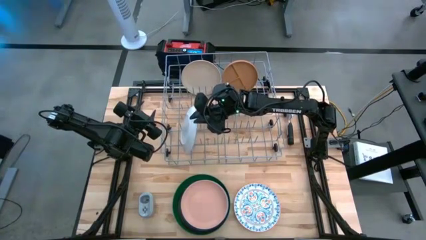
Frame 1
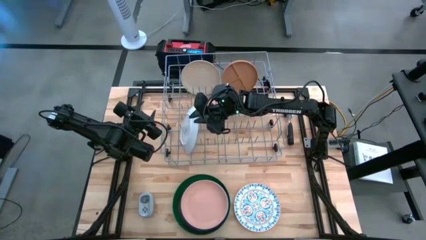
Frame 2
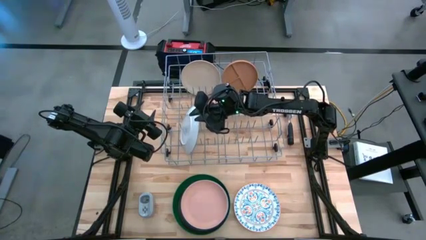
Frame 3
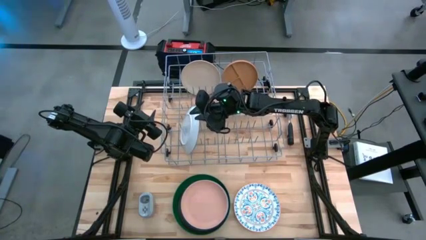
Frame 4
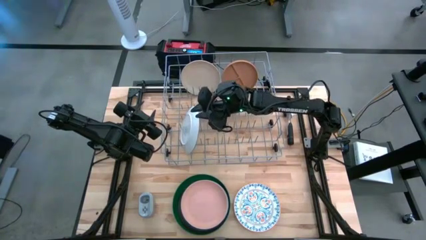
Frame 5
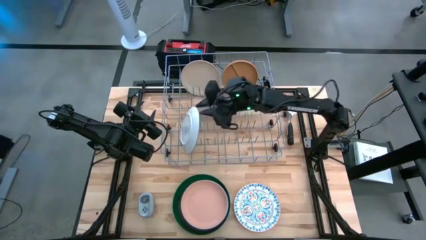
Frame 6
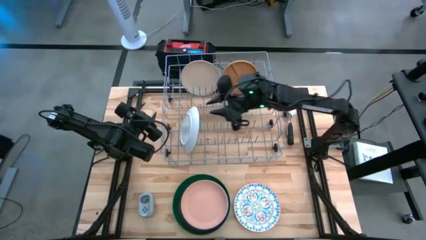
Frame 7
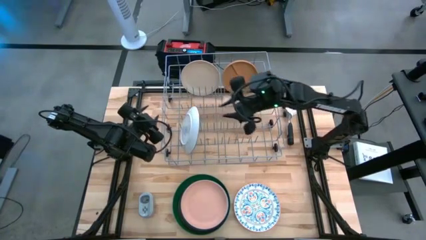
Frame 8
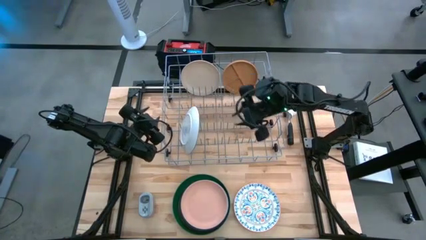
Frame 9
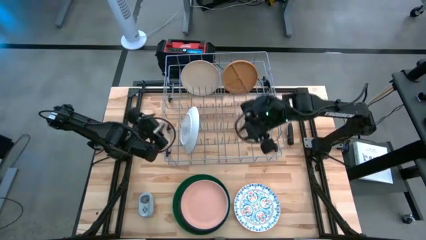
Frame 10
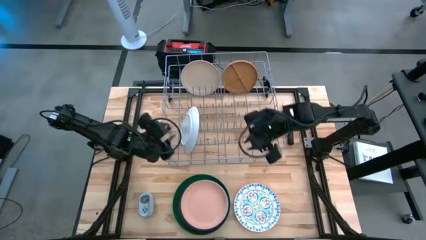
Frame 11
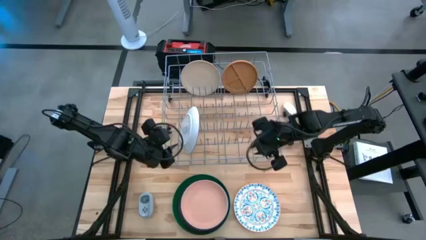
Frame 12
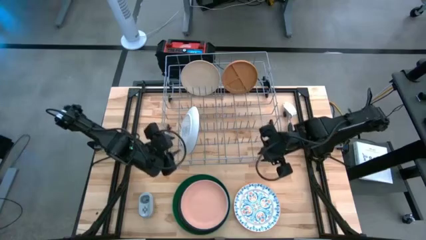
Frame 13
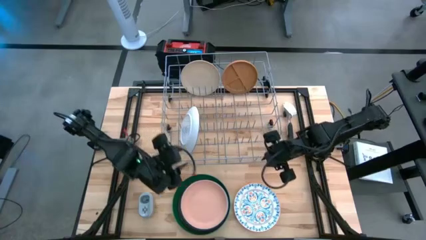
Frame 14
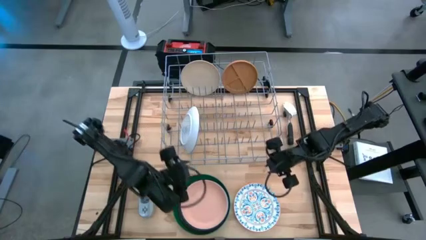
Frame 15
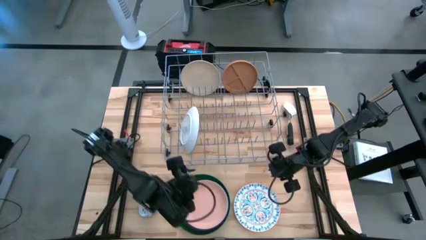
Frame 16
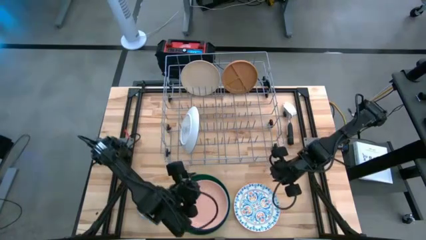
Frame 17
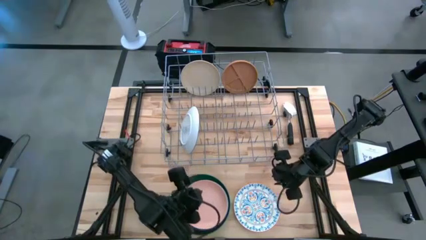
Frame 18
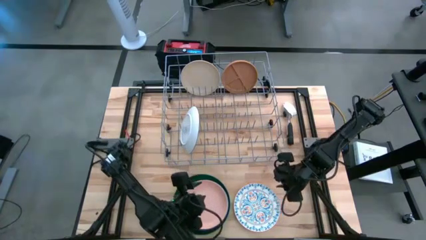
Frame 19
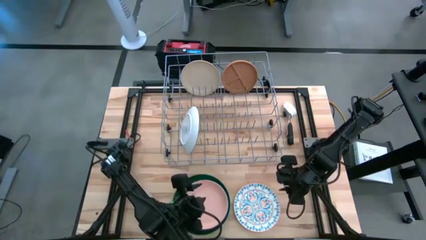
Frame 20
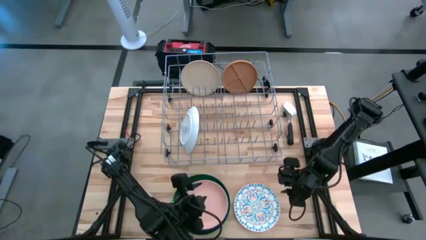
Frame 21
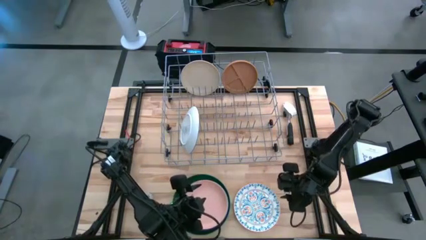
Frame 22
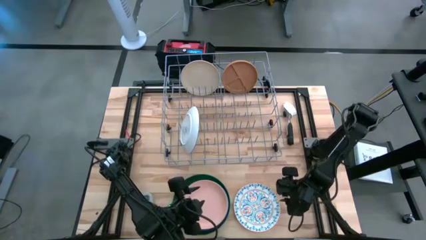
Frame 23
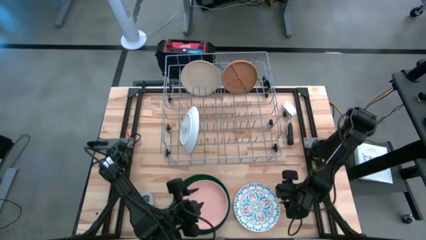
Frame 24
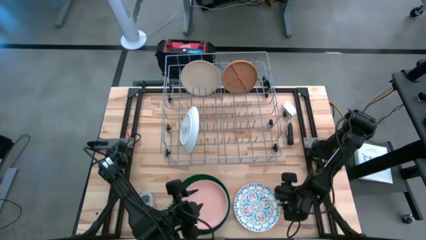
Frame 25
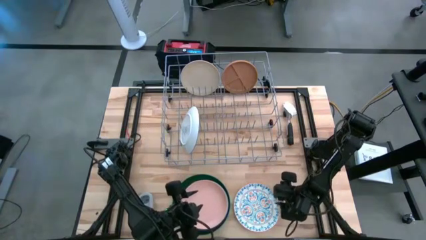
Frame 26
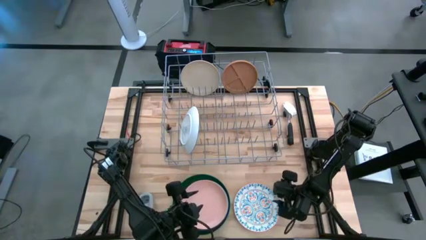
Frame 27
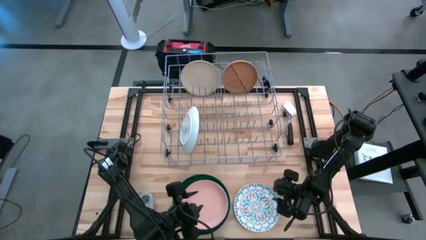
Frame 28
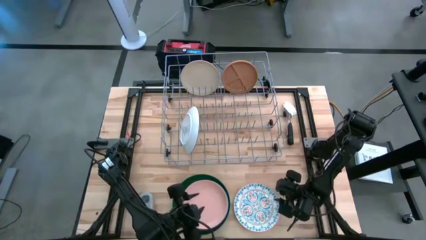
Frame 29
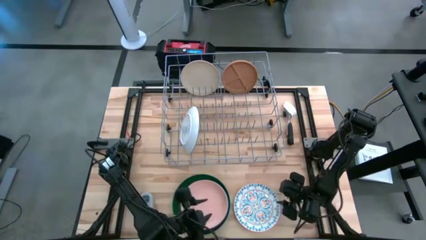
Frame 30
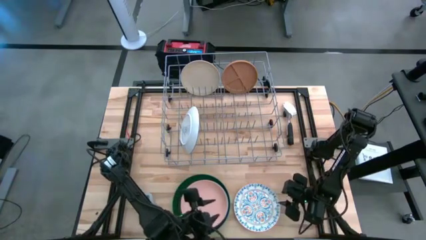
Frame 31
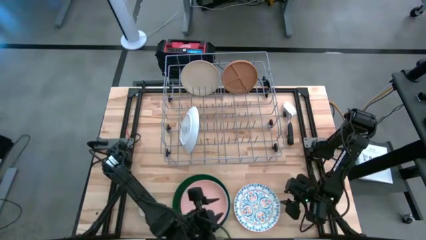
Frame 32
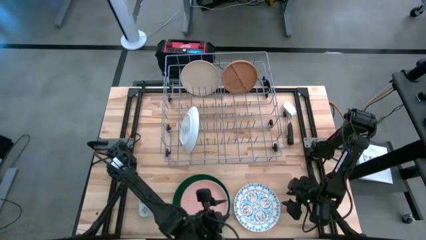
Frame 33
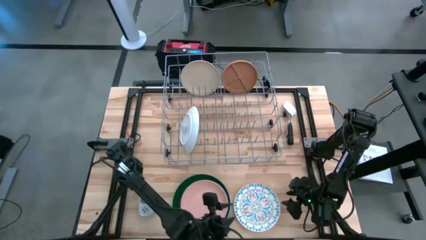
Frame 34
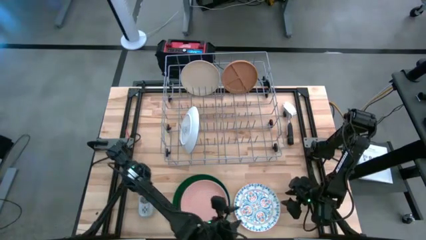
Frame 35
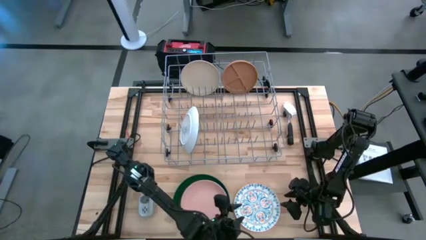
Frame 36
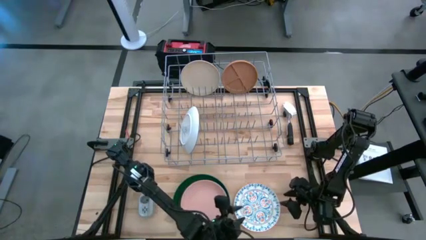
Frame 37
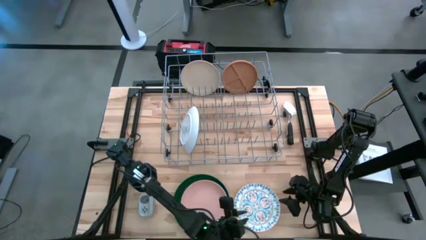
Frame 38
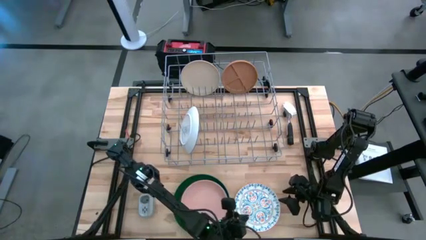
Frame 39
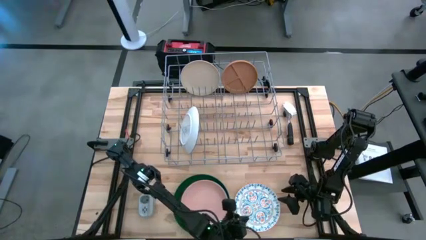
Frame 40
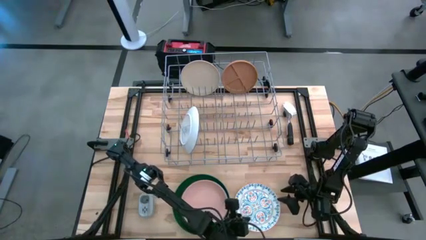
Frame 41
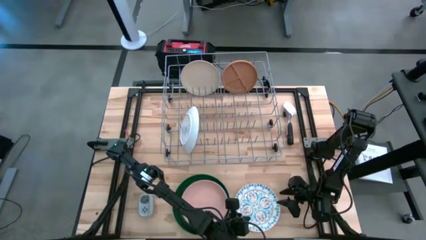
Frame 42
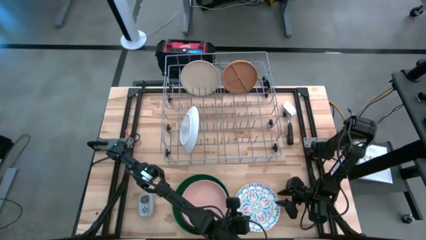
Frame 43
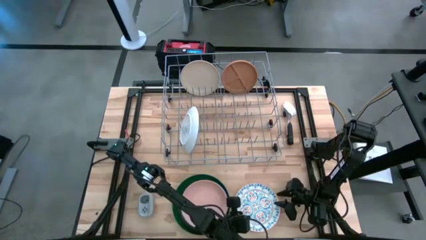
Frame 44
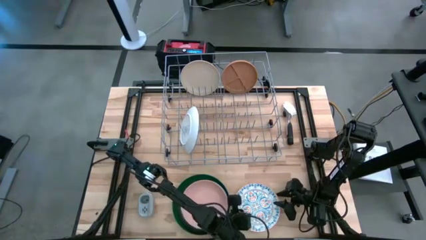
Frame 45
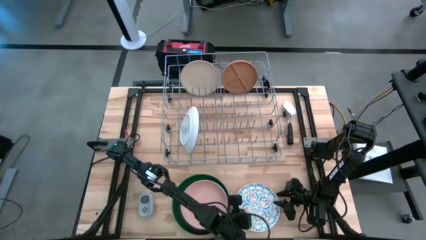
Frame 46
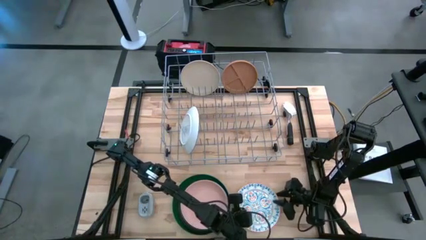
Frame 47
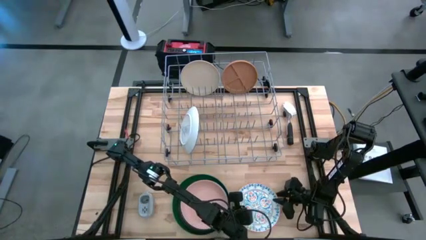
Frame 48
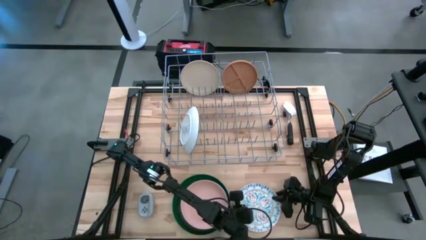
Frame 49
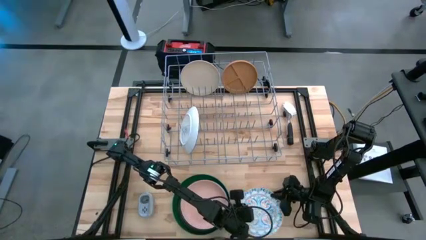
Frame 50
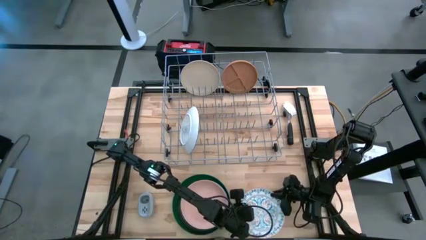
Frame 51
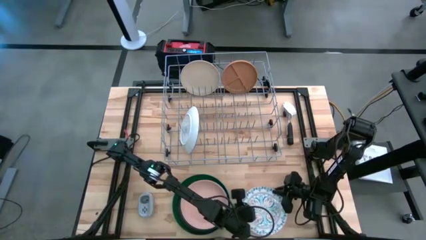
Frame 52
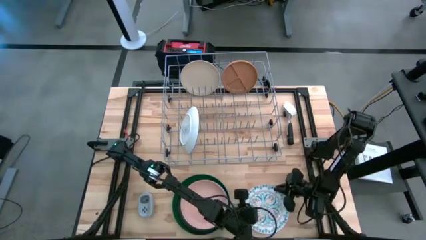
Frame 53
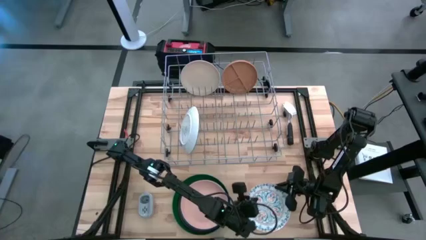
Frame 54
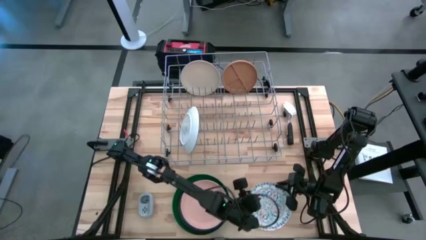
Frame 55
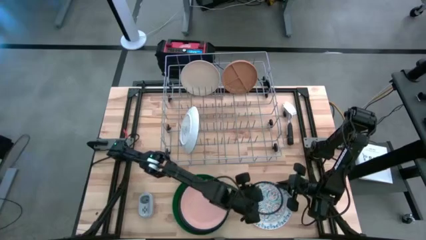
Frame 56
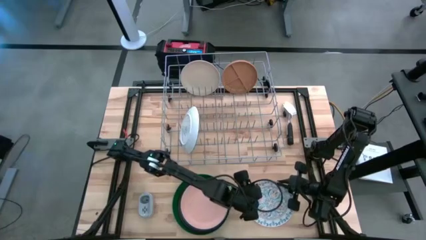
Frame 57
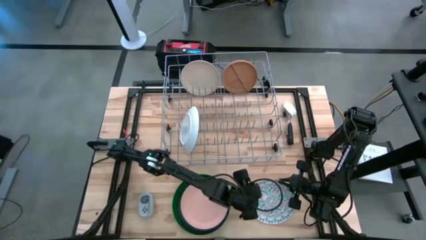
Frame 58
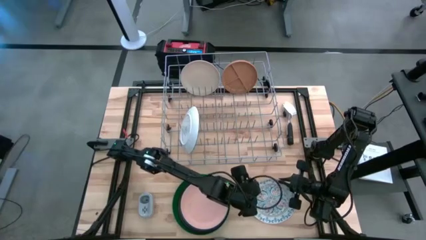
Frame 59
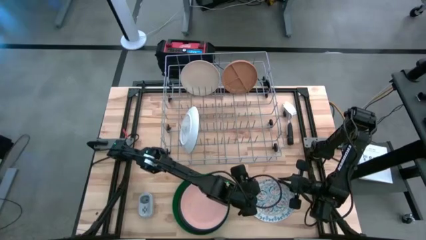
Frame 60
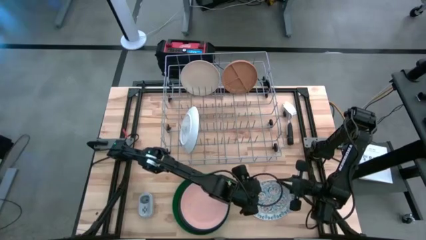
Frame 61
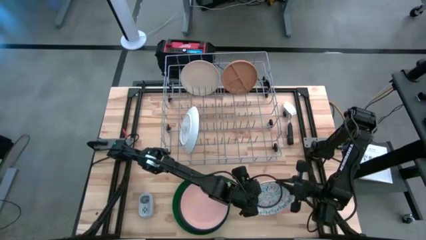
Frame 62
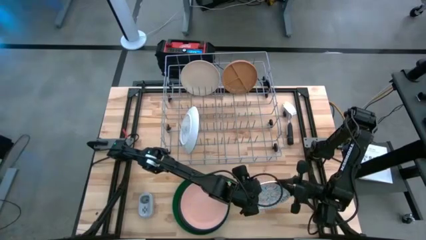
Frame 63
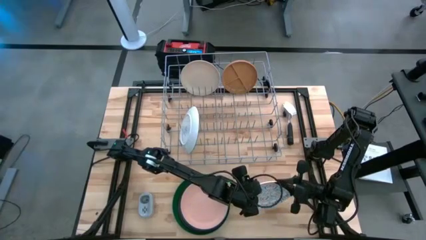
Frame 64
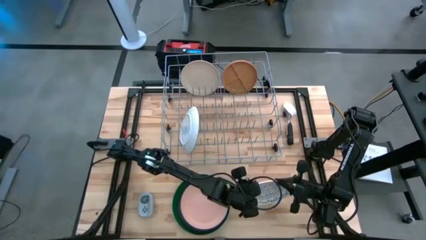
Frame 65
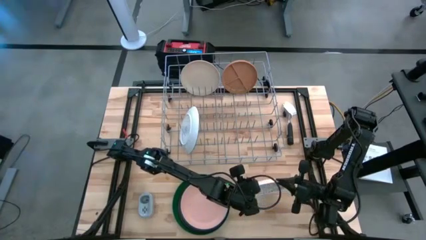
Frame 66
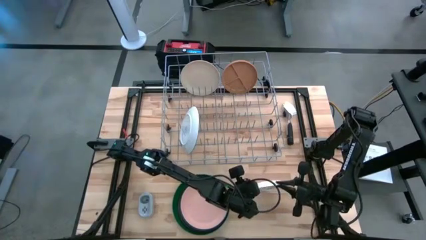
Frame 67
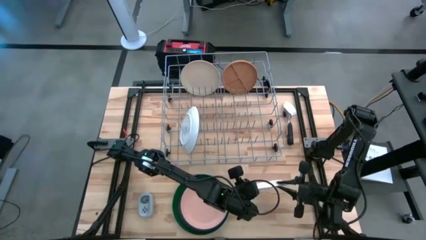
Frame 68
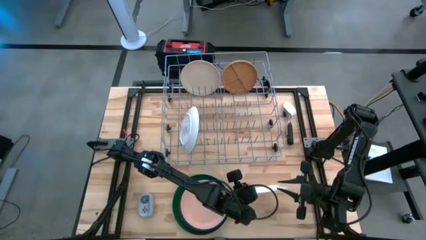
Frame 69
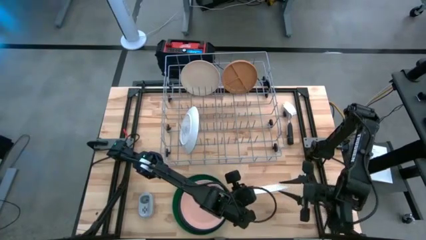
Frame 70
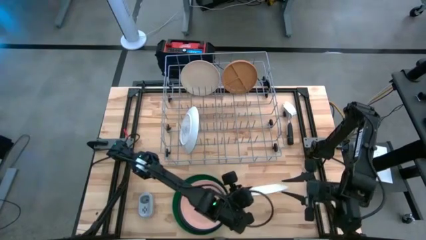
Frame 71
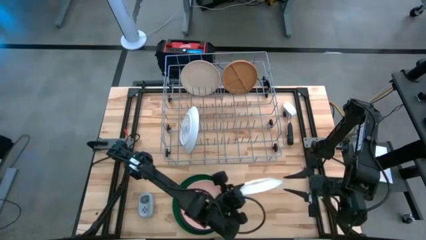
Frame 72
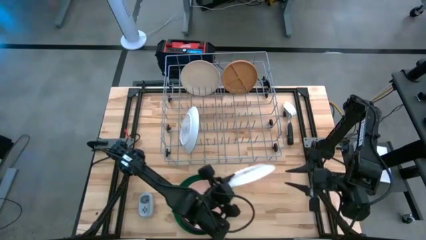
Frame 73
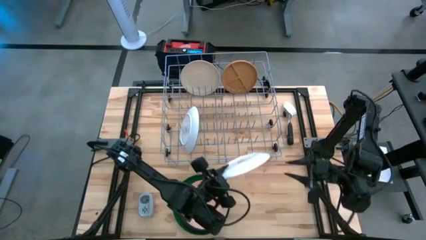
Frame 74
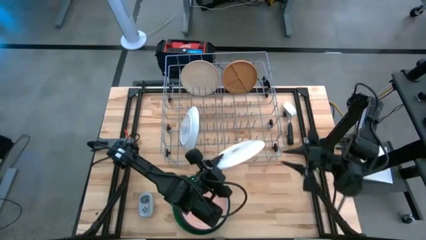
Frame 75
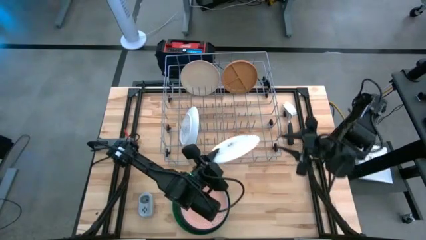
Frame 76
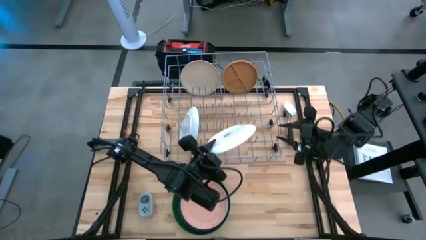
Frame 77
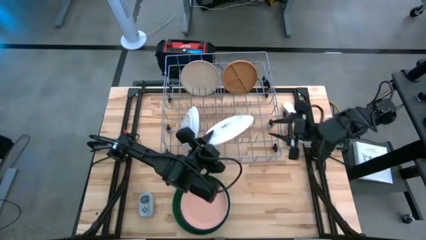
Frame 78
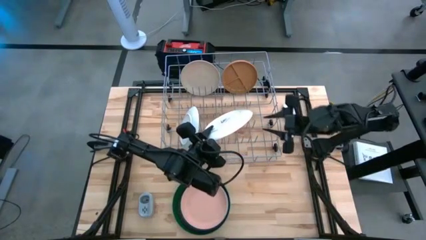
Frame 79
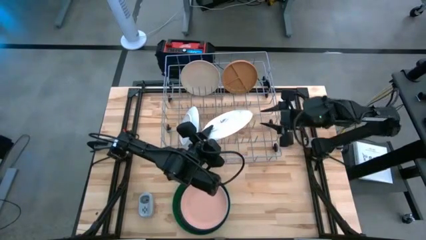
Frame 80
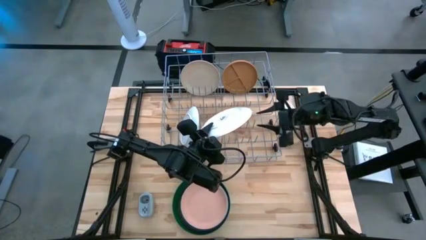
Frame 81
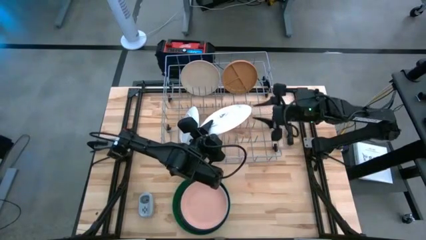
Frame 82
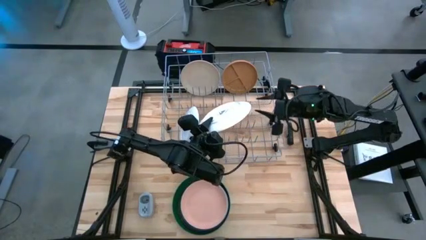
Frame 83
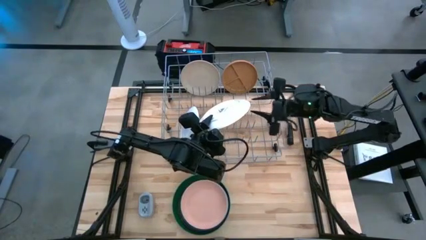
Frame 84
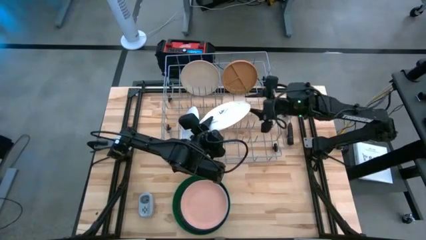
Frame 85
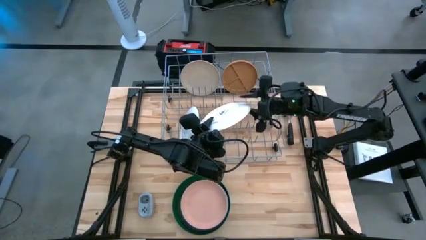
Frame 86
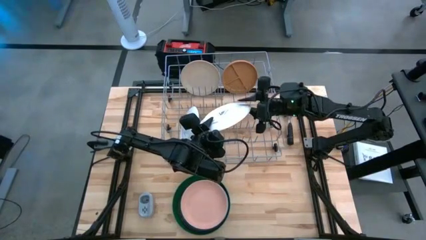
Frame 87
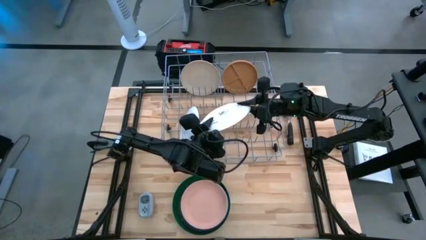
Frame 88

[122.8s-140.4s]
Task: Sort dishes
Put the white patterned plate into the dish rack
